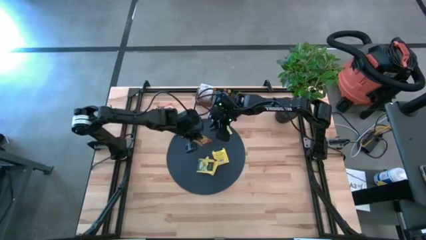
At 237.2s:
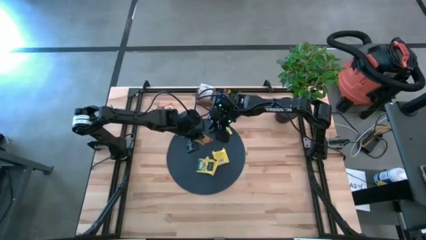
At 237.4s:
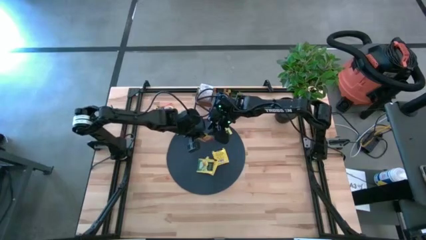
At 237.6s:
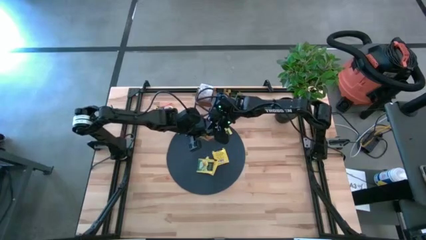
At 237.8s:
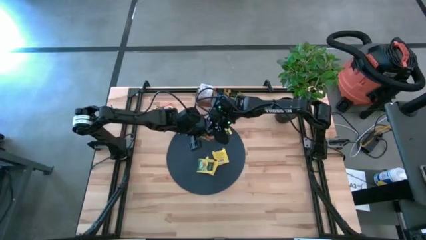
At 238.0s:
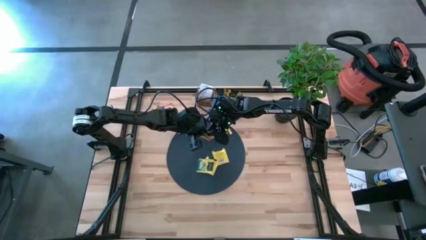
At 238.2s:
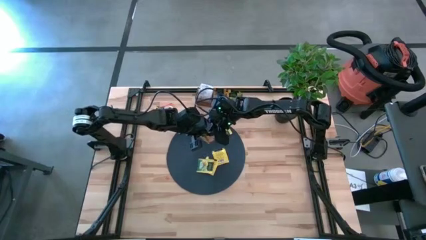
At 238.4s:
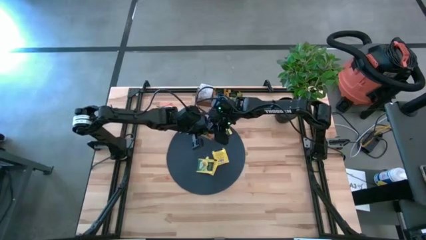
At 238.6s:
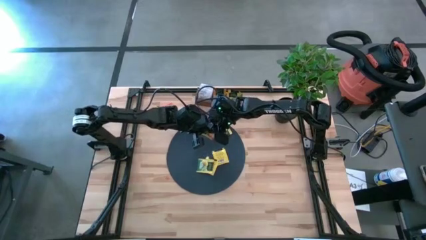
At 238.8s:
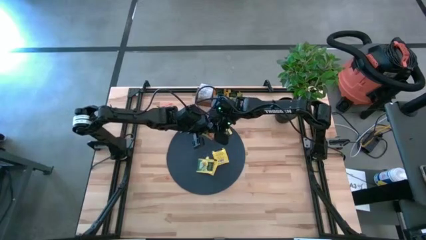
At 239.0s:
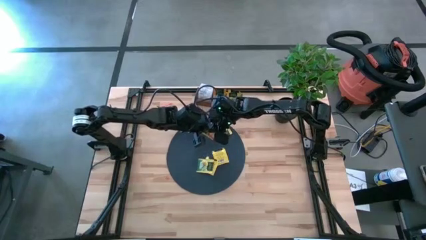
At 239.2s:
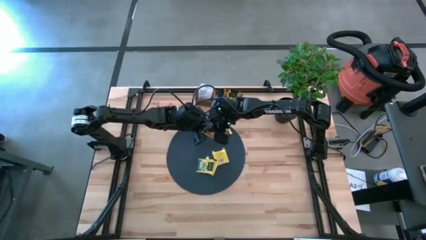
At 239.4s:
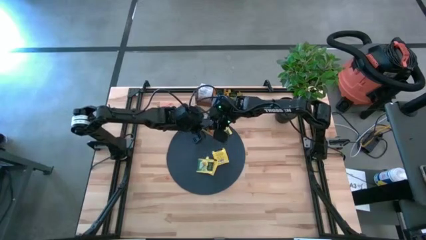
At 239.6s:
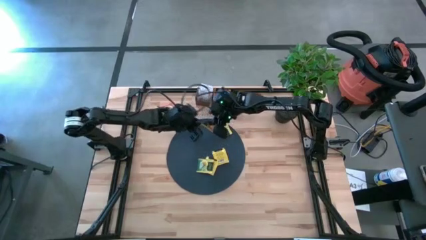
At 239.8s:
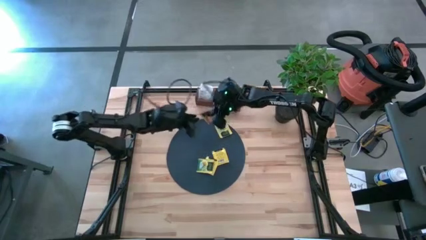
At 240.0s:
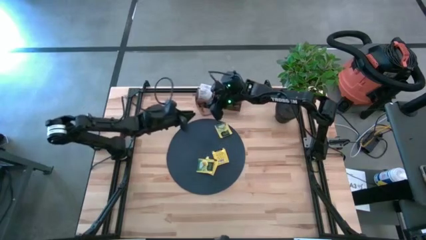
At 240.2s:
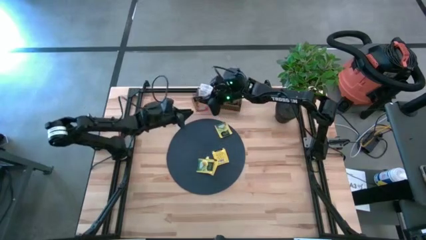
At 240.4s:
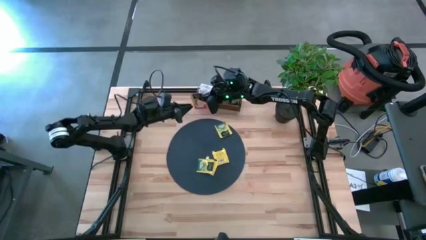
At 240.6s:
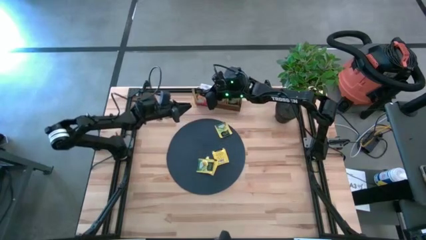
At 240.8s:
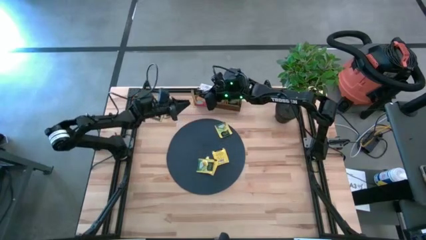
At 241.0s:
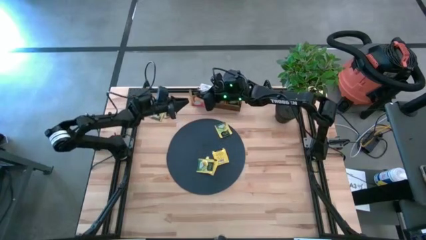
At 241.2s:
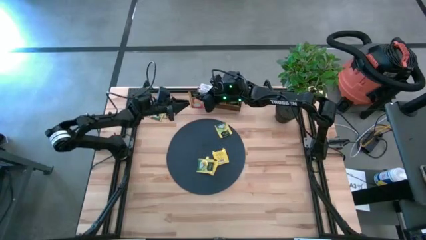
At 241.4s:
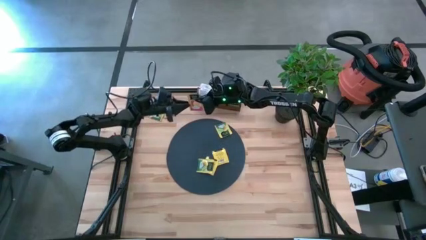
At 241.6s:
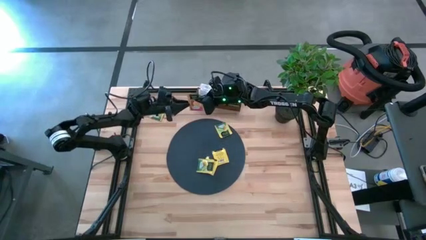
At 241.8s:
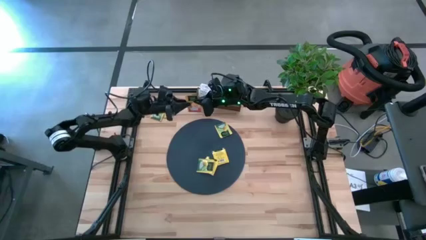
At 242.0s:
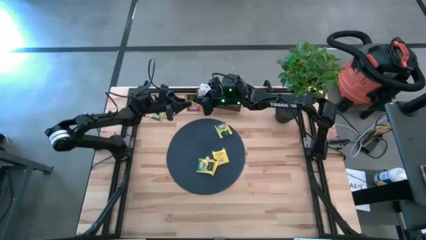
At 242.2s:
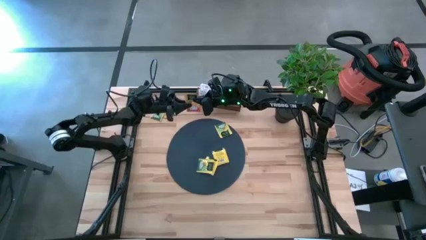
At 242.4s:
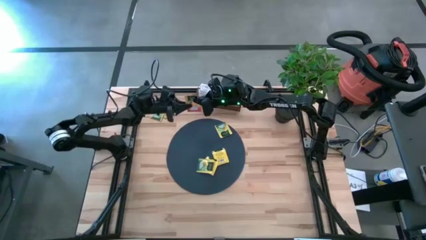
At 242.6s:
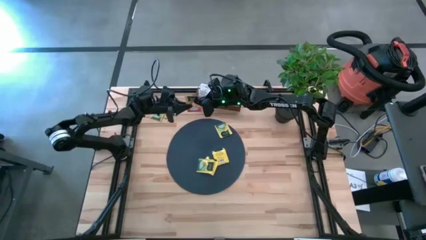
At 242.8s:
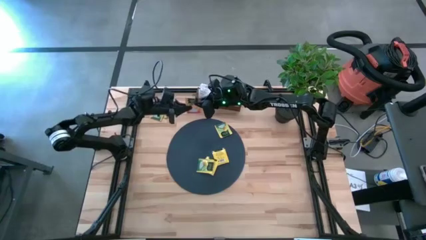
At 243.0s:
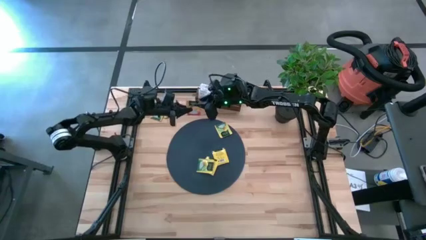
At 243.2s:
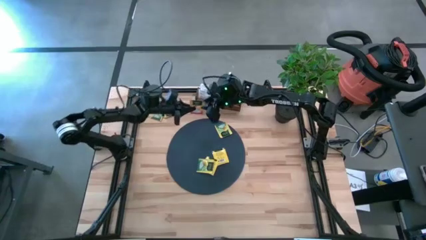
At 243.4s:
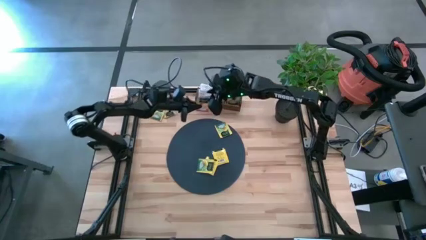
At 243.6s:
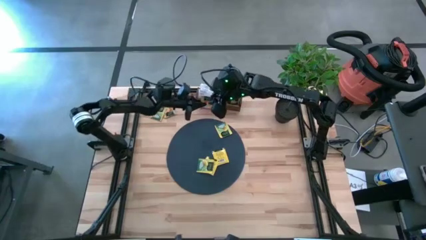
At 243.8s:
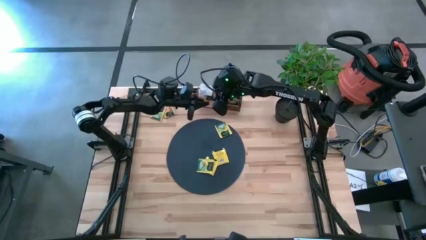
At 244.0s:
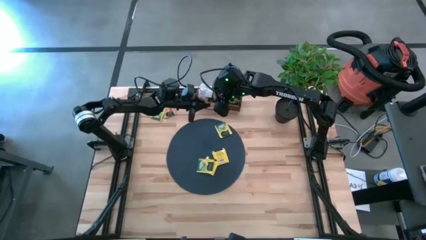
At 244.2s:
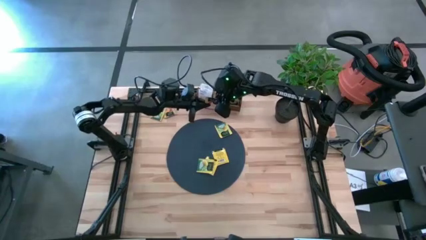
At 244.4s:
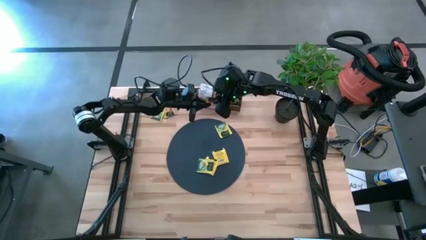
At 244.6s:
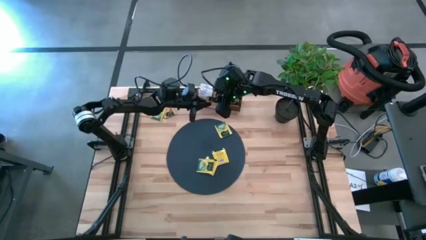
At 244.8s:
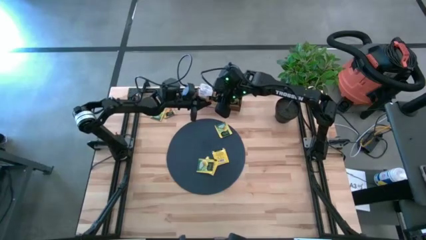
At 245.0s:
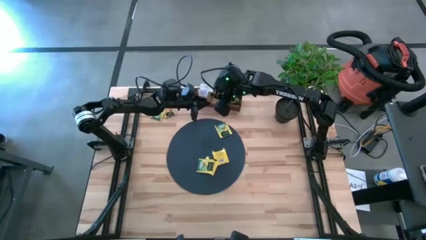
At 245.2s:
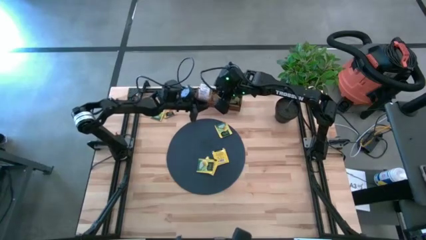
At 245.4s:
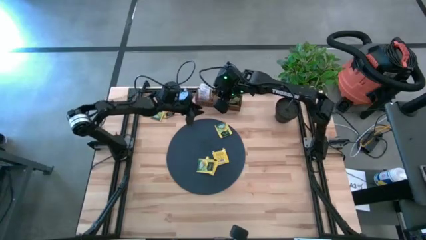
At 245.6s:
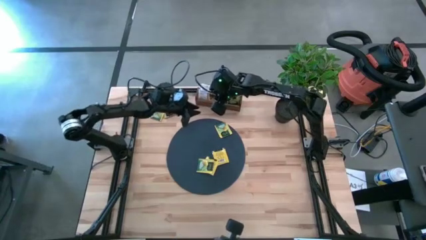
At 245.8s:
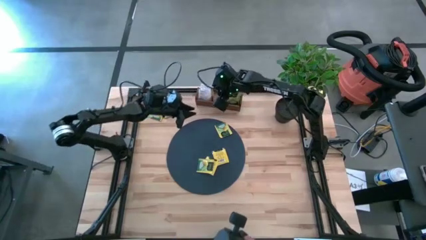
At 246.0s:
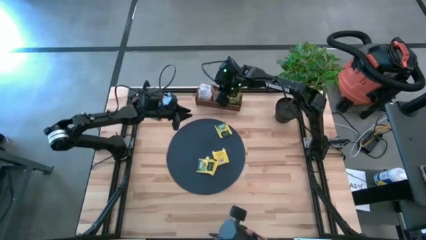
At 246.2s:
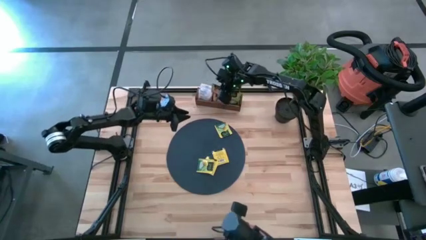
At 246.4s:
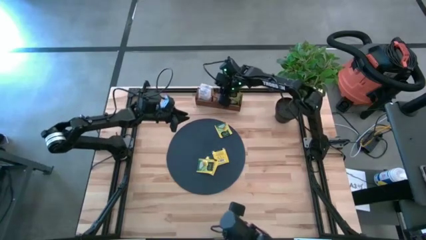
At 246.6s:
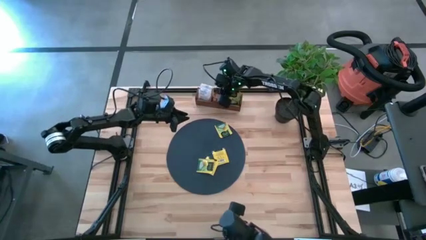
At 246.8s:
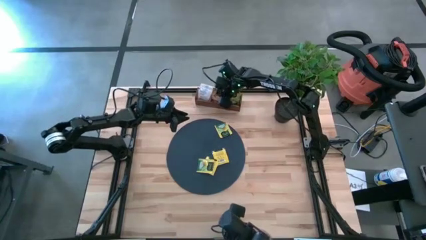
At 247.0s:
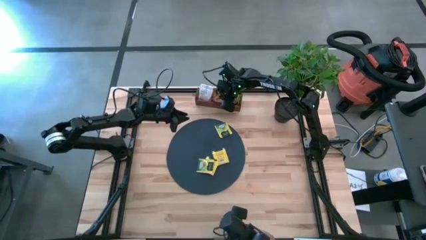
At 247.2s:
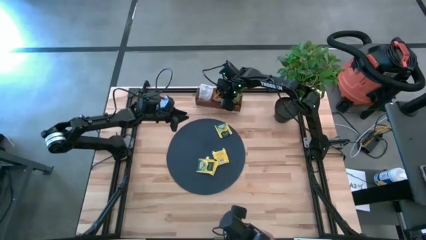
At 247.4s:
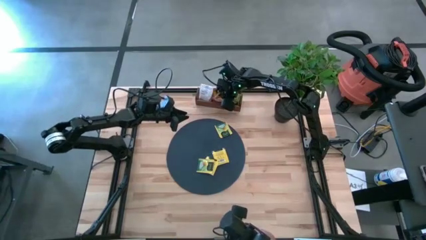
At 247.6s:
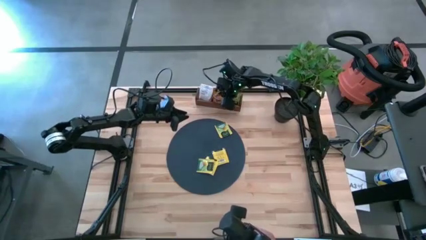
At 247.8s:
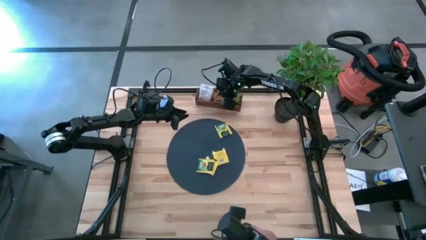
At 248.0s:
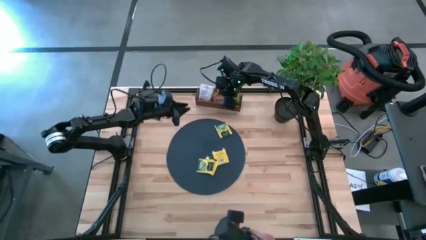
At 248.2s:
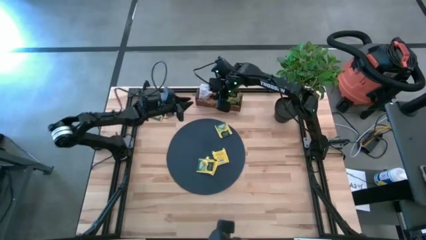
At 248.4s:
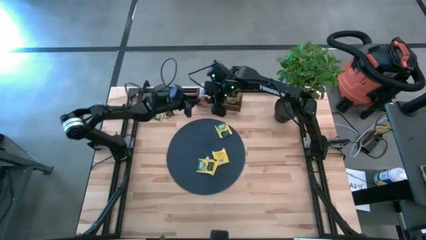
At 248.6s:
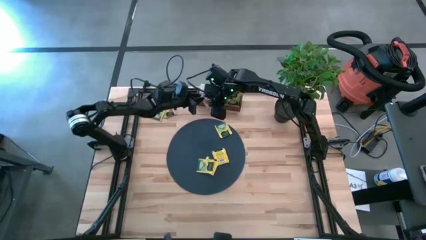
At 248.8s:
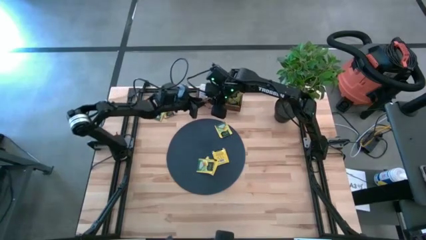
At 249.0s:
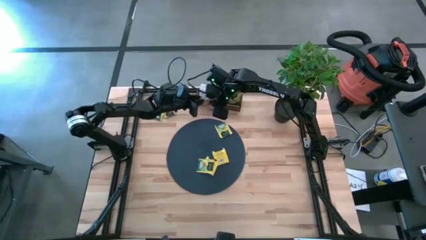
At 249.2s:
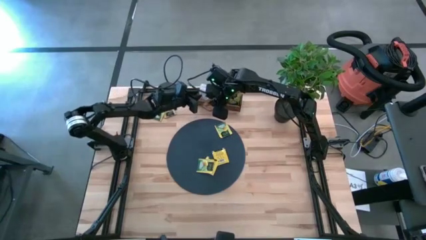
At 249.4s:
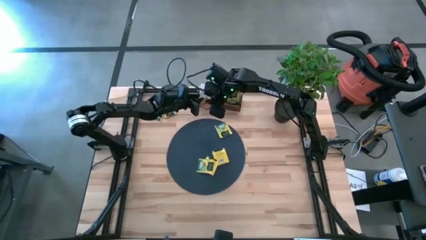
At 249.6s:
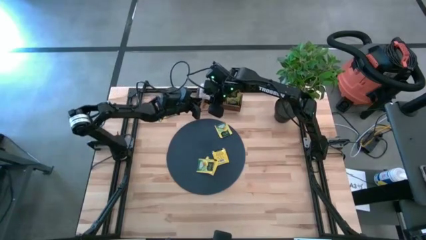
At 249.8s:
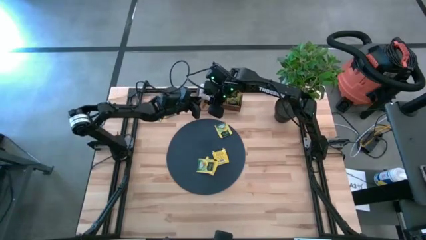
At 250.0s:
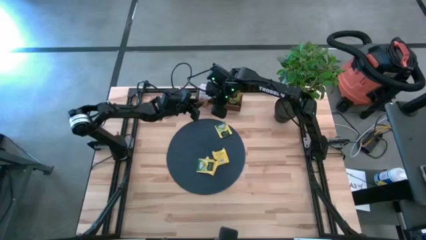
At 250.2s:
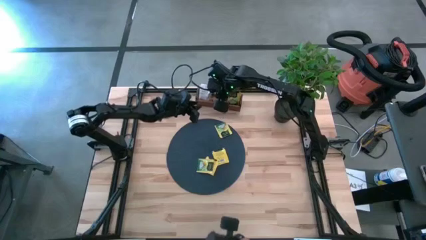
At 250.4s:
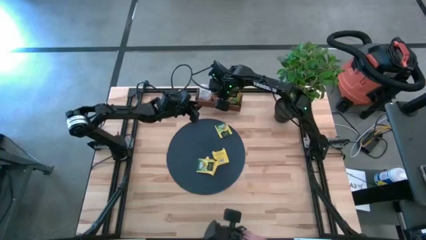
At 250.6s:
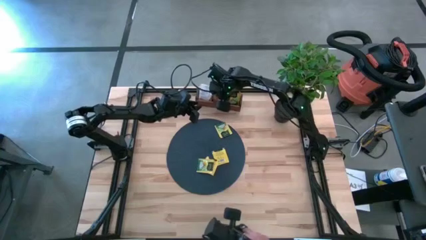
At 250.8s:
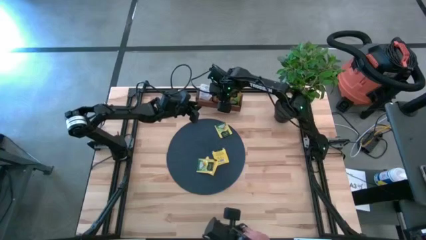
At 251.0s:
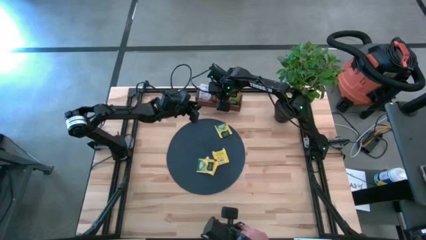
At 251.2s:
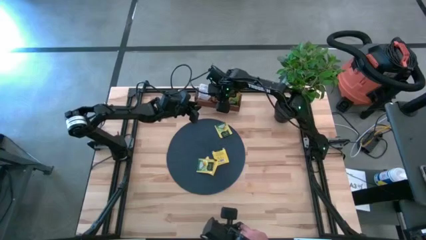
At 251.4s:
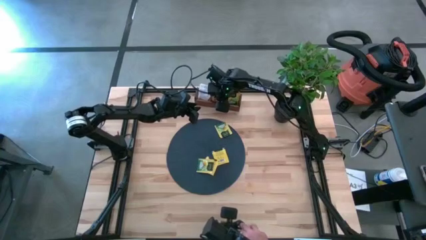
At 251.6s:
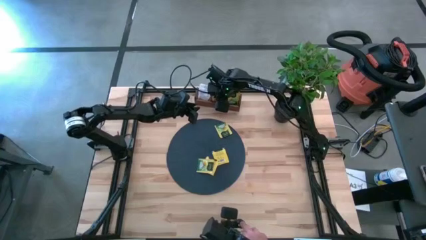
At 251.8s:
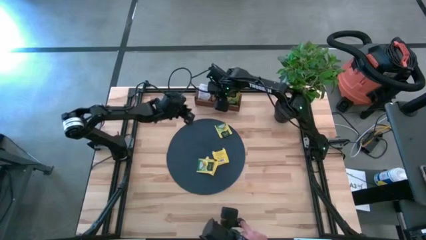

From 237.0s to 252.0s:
Task: Pick & Place Tea
Put the yellow tea bag into the middle section of the wooden organizer

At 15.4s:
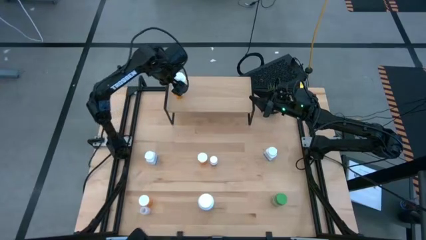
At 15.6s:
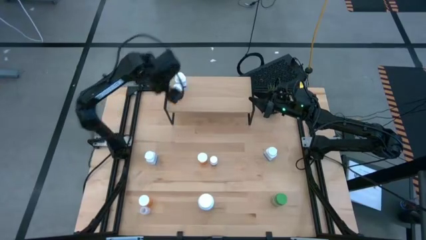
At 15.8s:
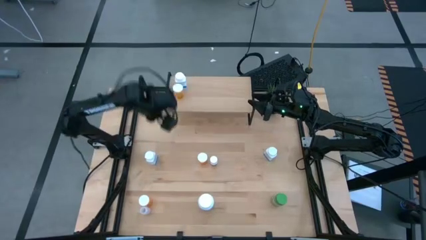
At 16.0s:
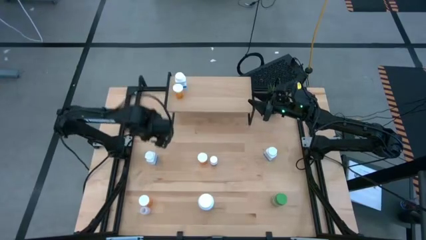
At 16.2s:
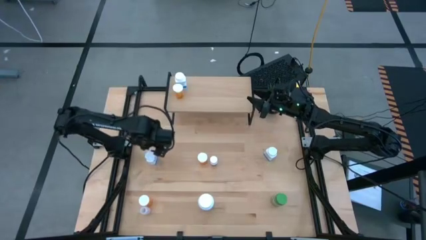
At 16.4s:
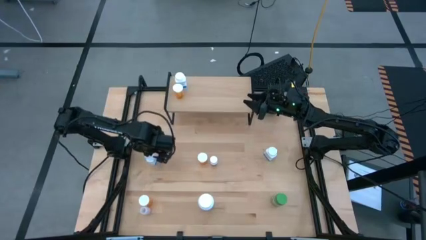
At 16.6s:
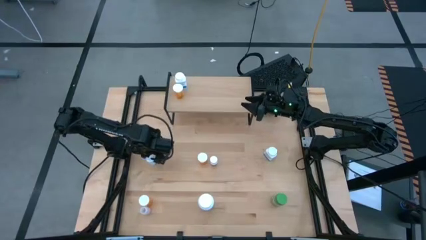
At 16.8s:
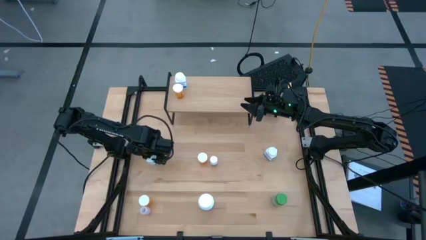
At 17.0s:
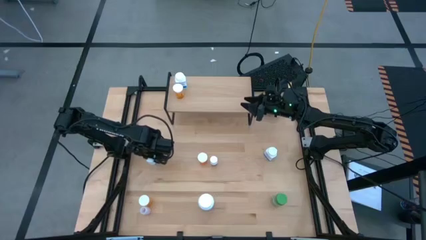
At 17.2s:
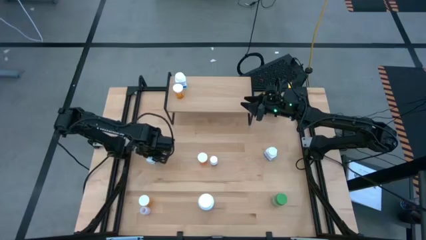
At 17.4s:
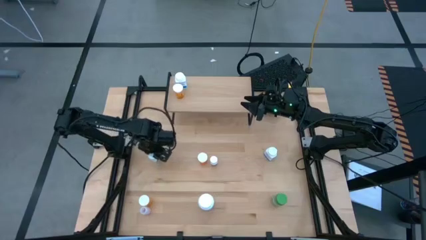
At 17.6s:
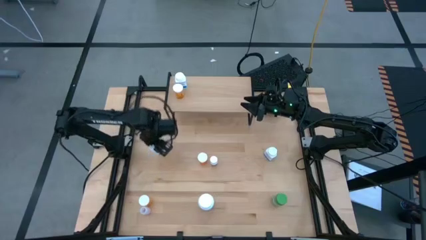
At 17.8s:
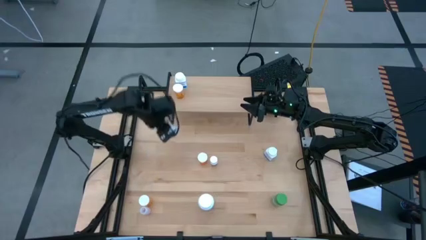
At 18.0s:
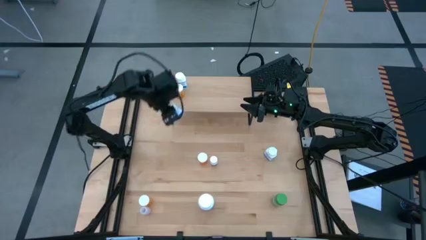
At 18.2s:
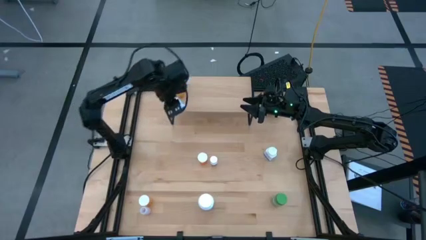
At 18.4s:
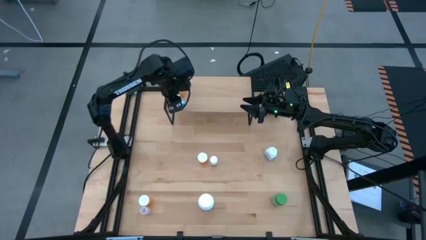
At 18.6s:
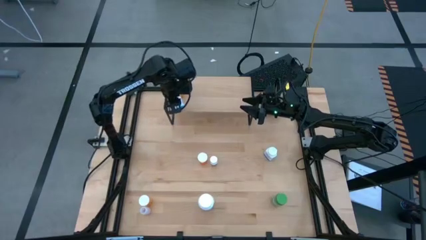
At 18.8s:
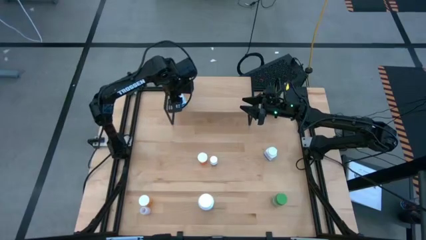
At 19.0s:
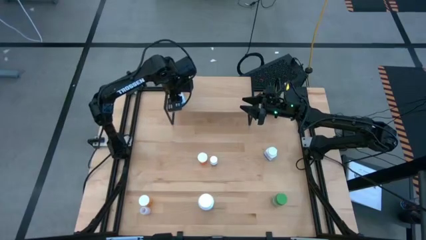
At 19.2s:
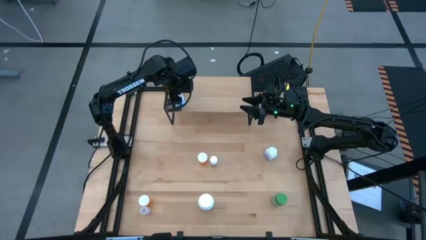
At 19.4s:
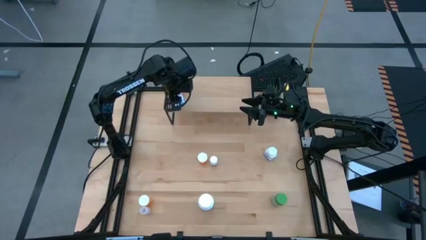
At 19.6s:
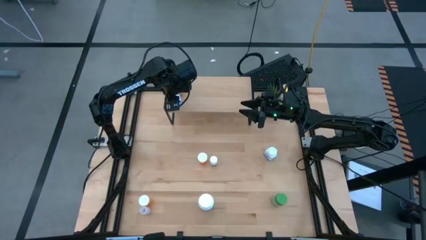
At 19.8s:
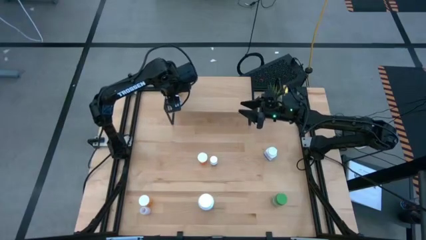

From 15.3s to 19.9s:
Task: Pick and place medicine bottles onto shelf by color
Put the left white and blue pill bottle on the shelf
